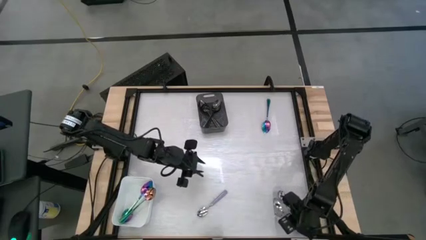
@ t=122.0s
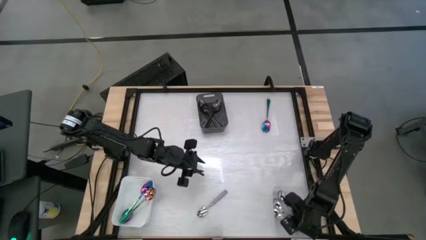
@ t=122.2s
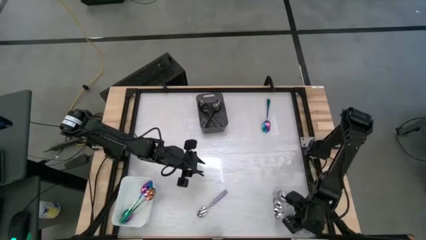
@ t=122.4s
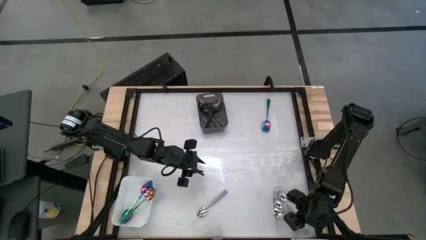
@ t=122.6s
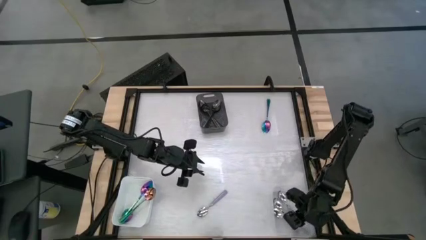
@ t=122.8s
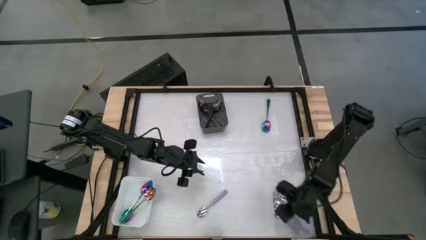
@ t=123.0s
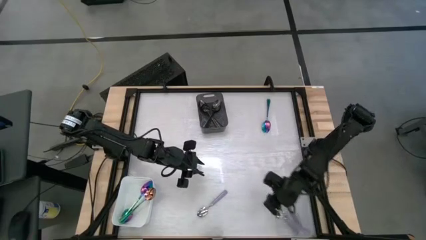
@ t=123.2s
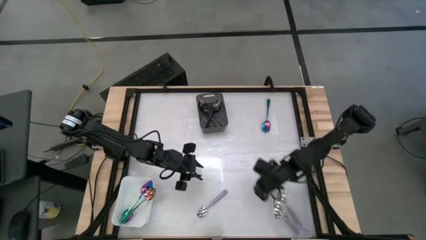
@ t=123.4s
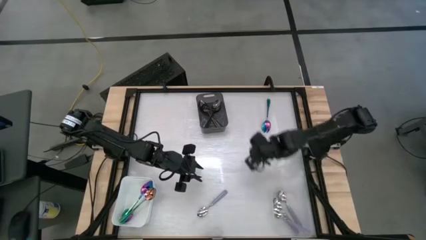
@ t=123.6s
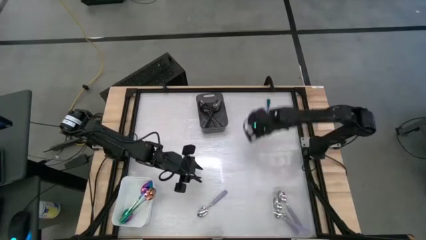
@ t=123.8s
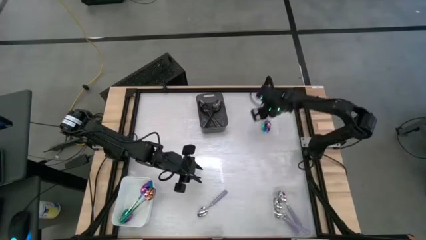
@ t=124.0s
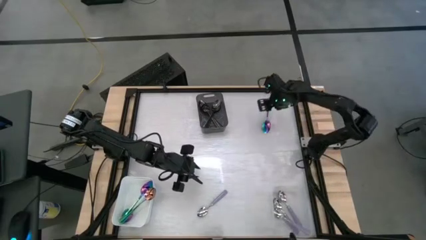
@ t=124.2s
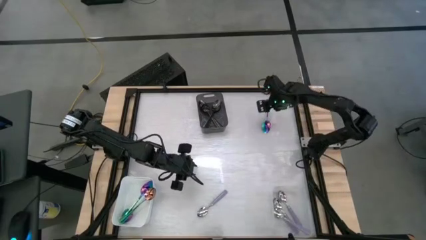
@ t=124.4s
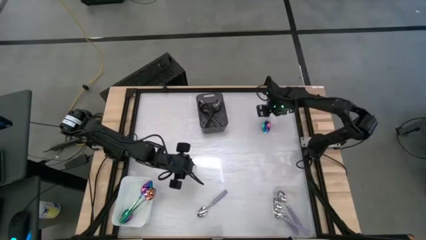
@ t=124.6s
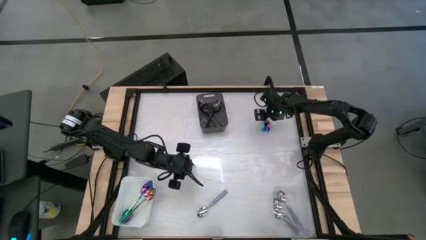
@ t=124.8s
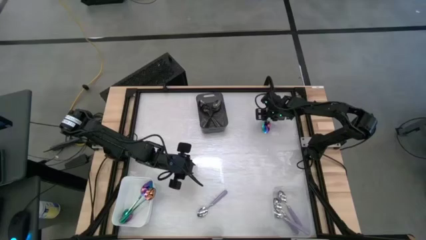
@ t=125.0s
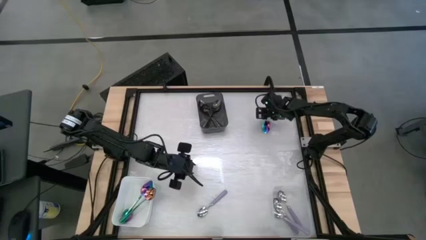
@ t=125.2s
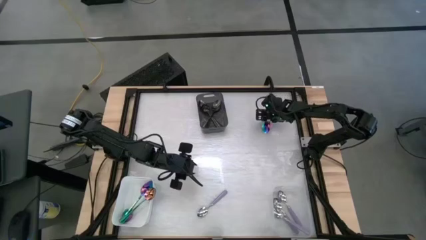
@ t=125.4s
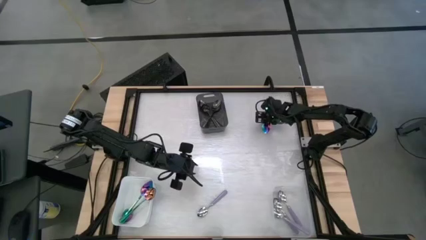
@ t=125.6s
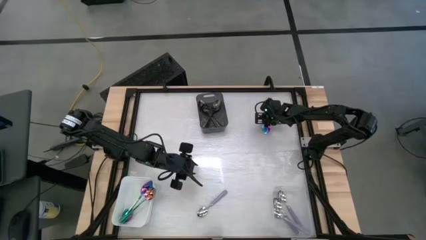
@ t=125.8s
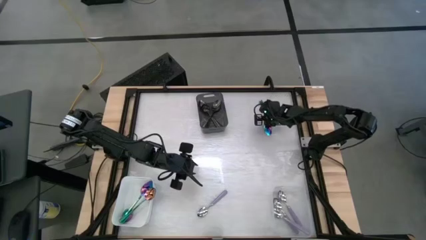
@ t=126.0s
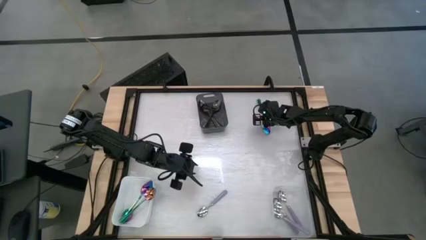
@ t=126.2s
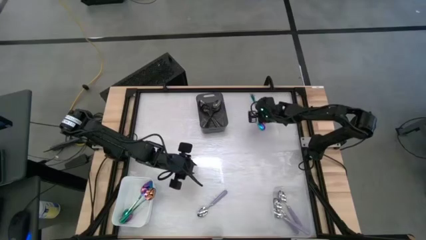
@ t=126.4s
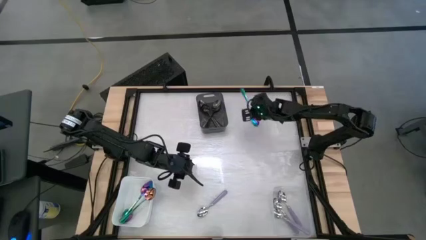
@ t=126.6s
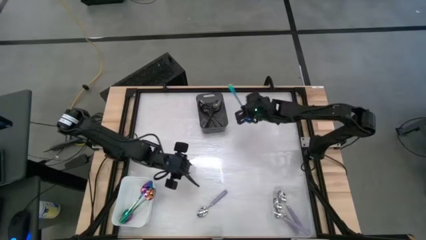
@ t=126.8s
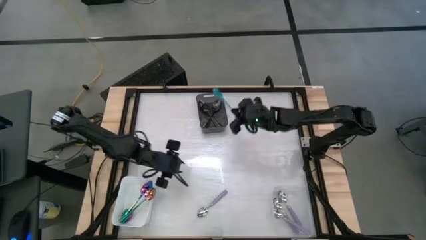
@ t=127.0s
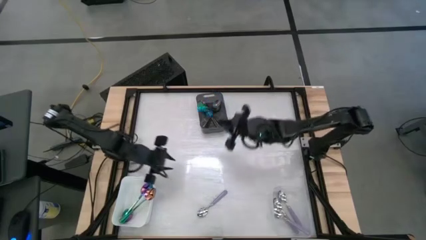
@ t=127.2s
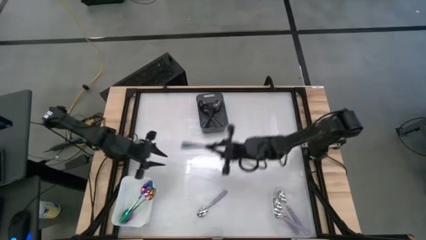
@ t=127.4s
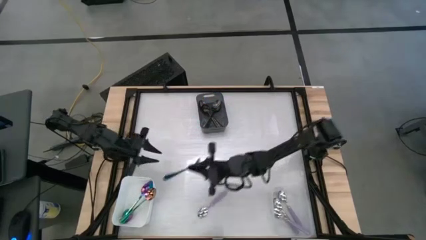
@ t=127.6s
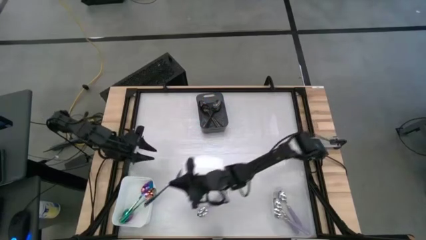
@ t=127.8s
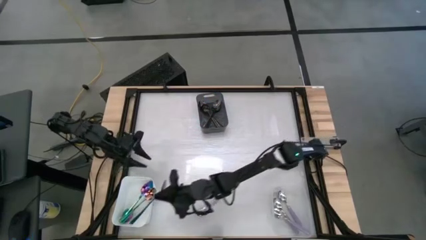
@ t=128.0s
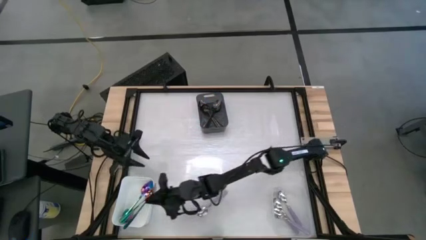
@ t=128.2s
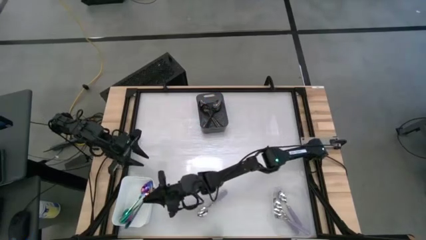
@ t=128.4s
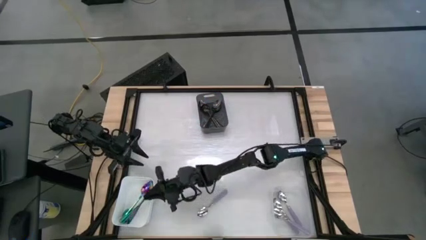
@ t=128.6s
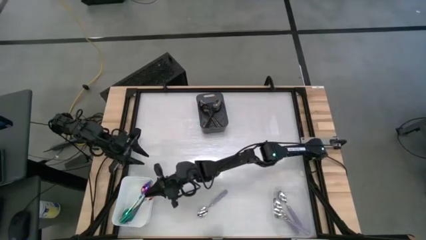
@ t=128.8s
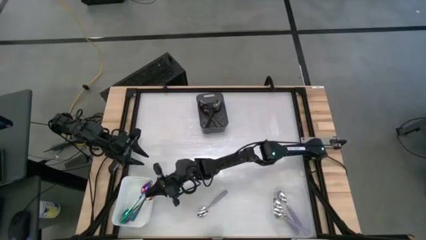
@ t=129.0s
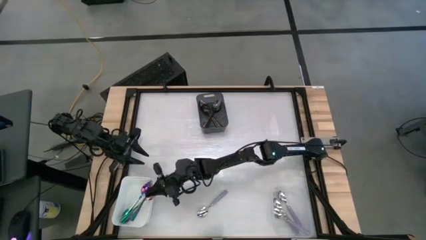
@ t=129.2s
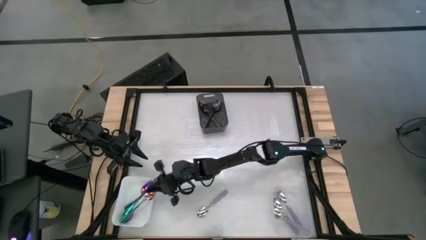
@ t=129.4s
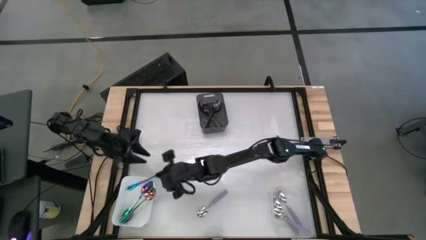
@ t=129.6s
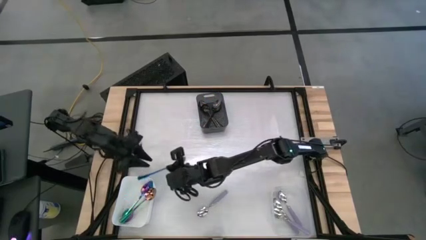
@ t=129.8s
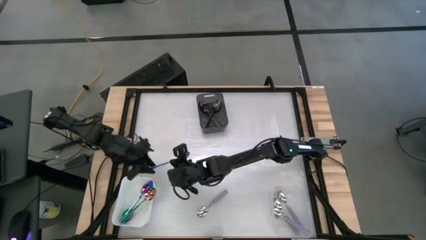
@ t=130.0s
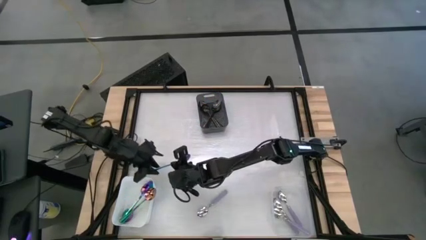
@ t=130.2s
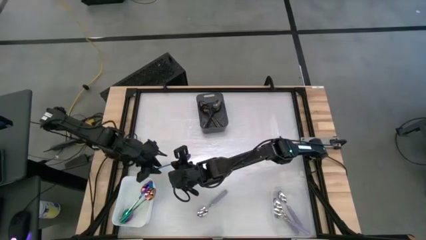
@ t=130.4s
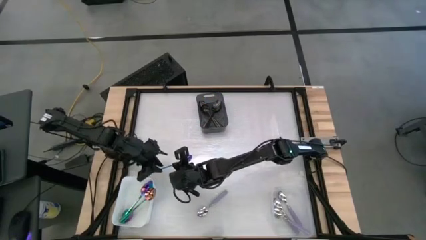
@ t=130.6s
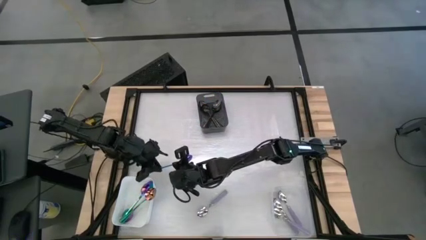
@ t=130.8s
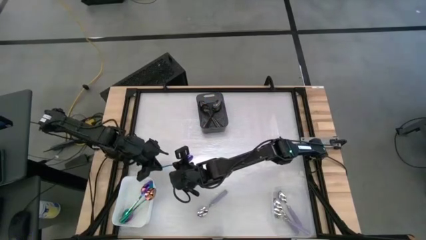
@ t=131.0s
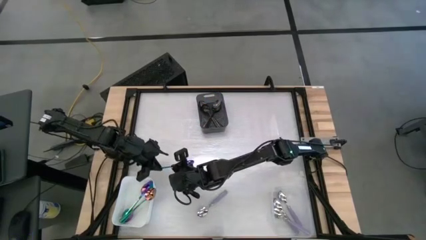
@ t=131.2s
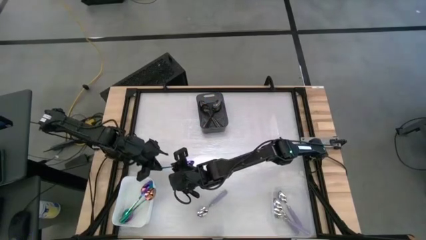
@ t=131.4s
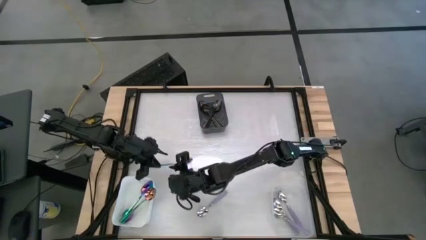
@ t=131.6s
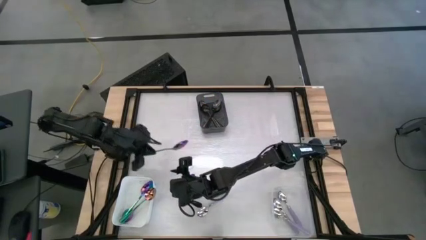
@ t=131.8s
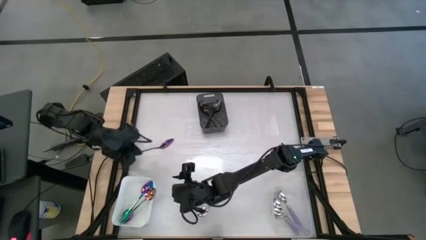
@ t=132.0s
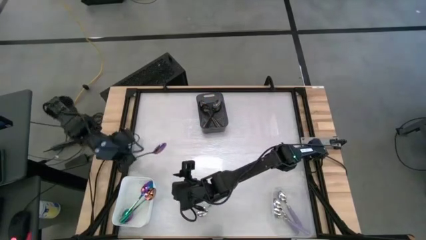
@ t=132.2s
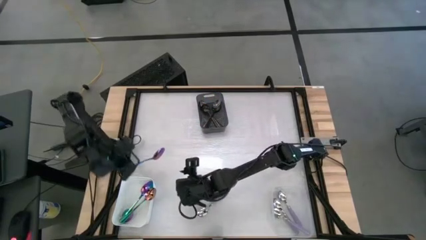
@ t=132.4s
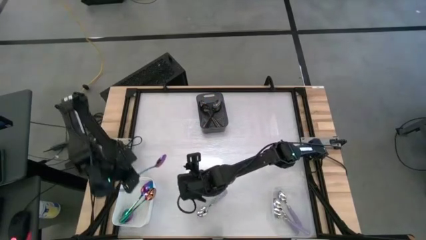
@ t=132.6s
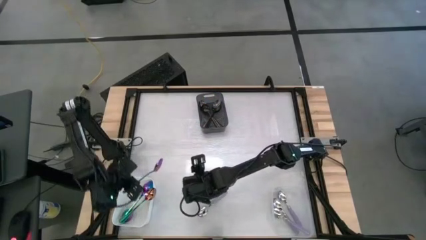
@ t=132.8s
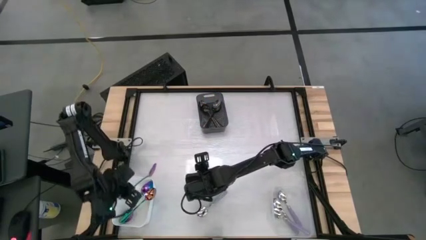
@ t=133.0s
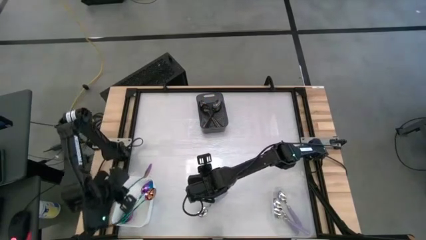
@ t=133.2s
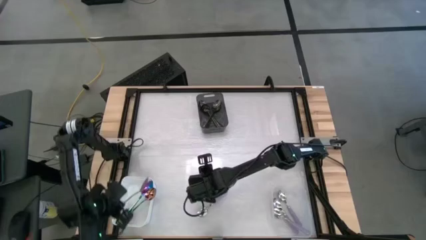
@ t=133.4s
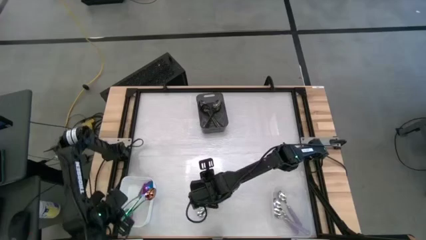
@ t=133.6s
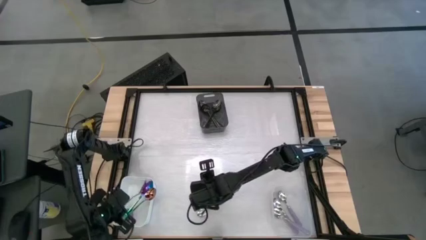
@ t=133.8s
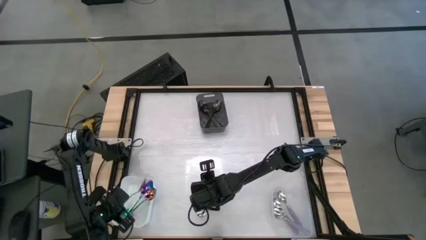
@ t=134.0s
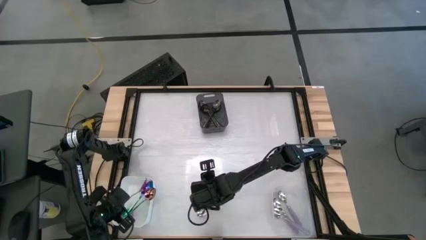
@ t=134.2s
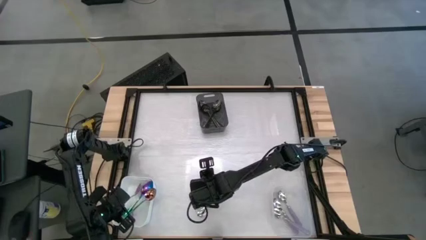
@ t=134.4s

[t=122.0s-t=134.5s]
Task: Sort silverware by color (type)
Put the blue spoon into the white bin

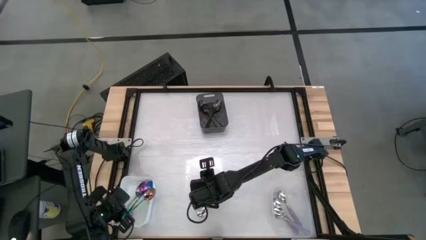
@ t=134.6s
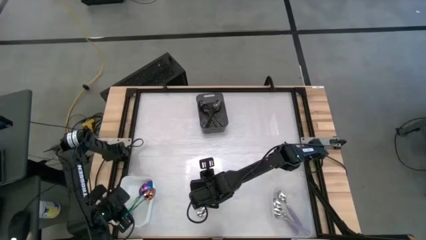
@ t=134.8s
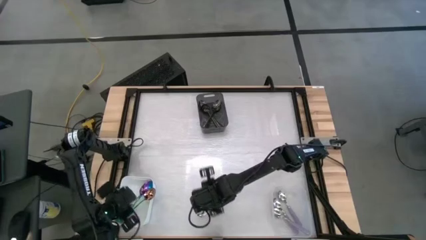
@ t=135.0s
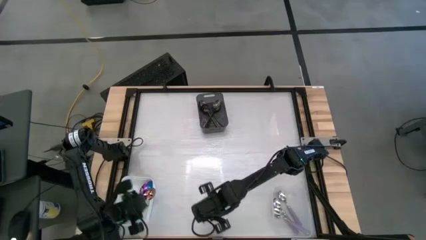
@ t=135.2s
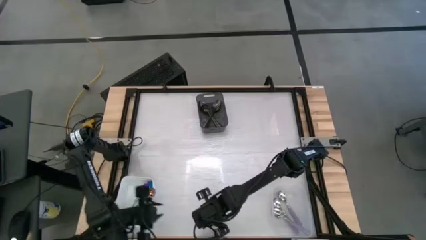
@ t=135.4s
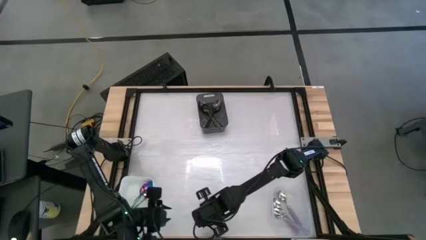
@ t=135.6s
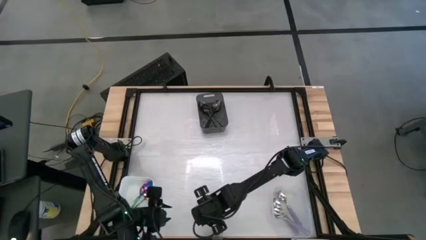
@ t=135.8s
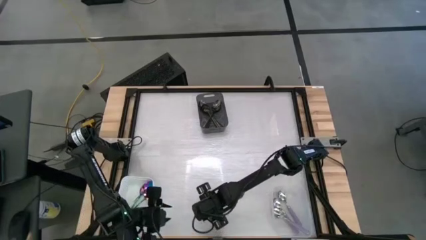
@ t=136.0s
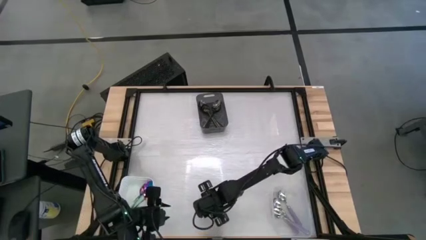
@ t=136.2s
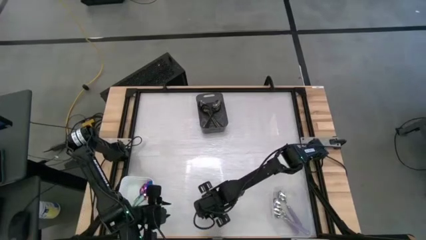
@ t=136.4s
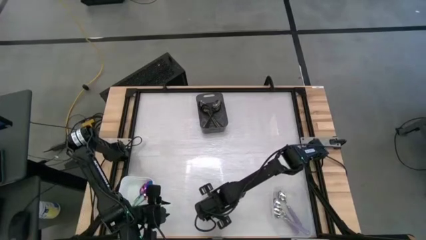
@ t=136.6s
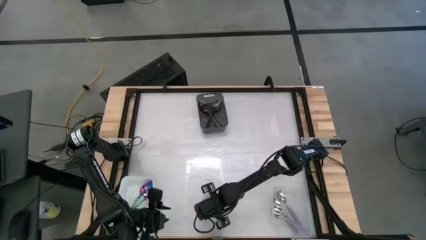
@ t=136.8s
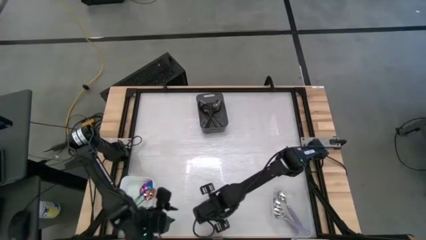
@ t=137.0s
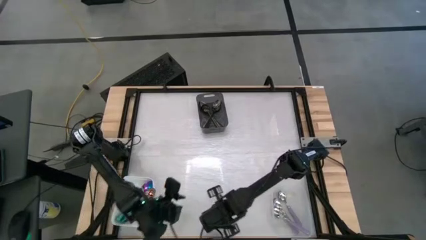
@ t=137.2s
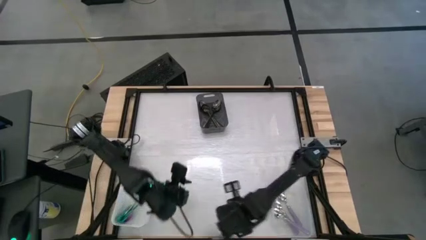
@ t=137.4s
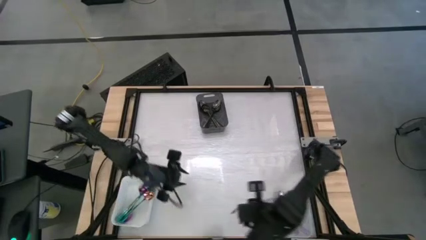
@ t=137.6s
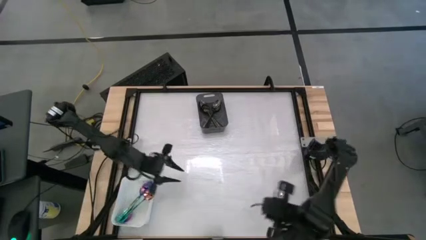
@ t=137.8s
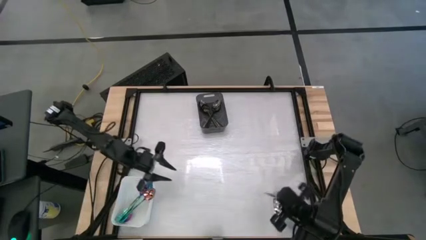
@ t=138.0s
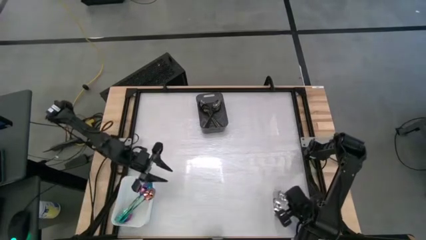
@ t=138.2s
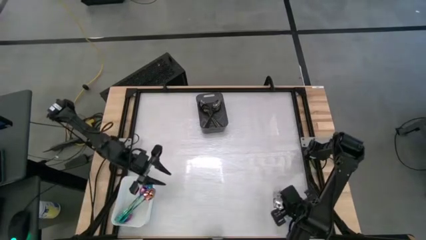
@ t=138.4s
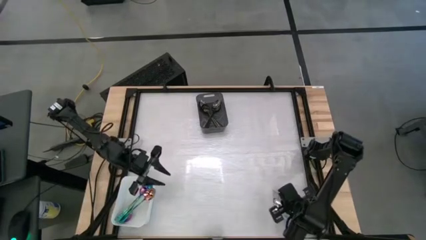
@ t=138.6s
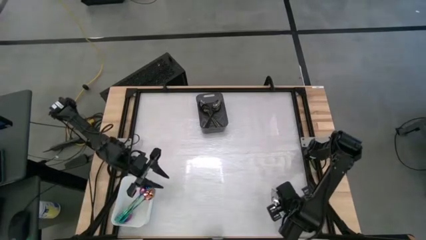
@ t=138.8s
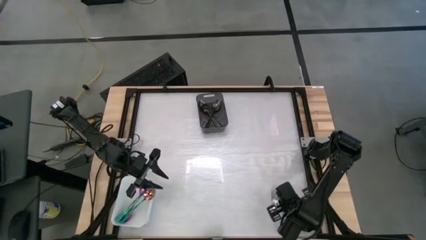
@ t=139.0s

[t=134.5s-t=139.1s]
Put the purple spoon into the transparent bin
